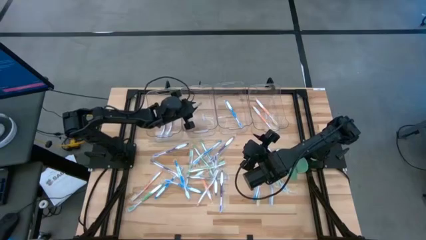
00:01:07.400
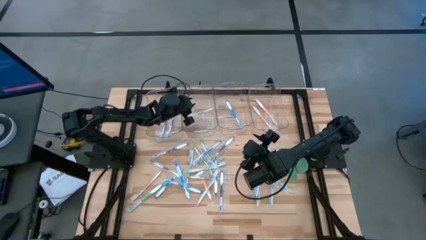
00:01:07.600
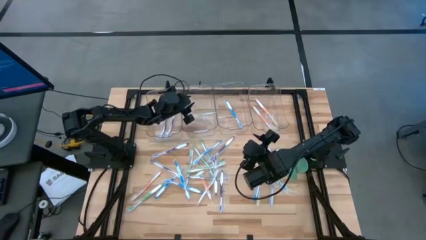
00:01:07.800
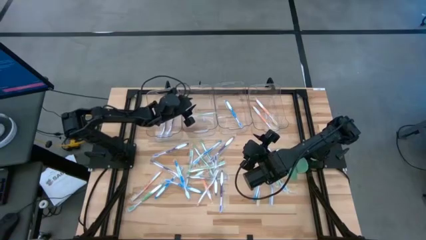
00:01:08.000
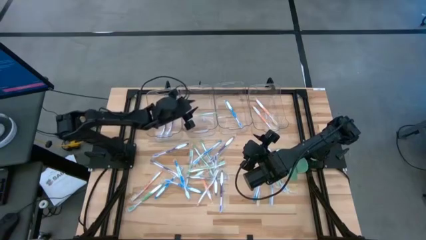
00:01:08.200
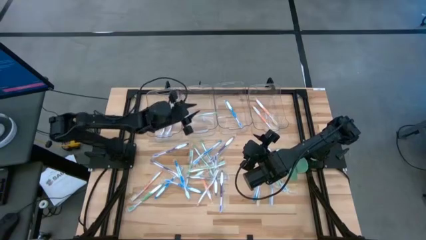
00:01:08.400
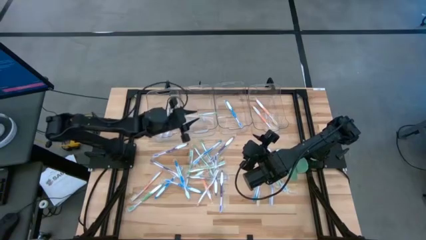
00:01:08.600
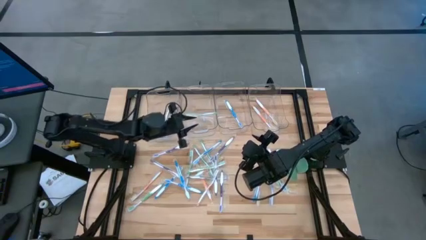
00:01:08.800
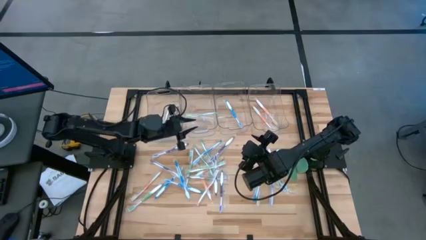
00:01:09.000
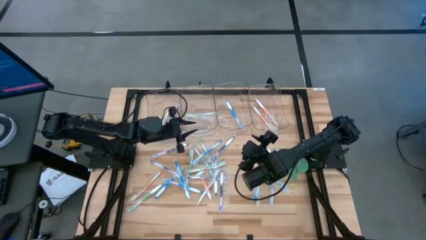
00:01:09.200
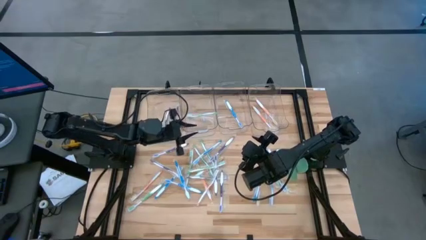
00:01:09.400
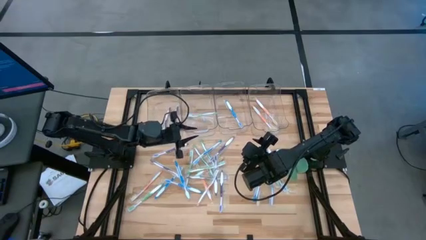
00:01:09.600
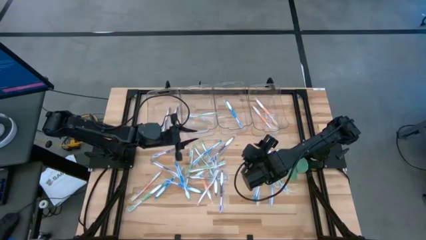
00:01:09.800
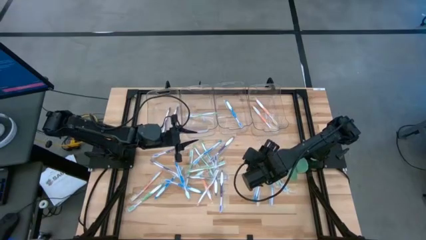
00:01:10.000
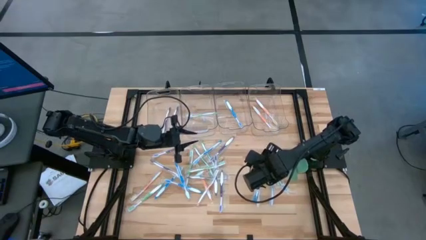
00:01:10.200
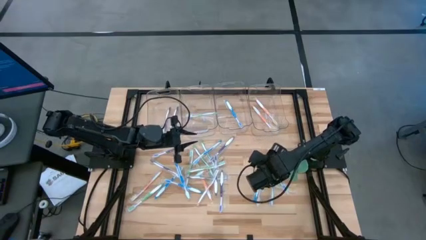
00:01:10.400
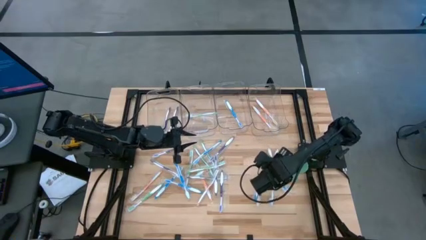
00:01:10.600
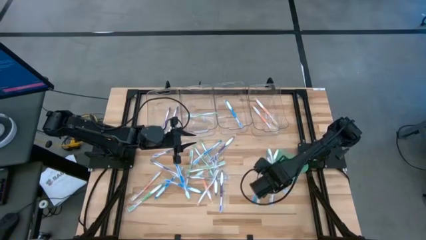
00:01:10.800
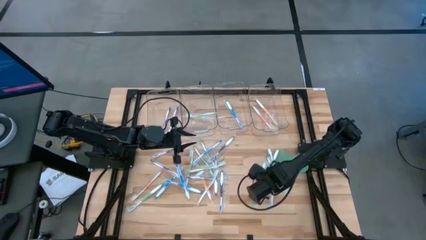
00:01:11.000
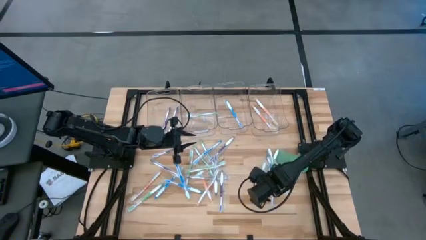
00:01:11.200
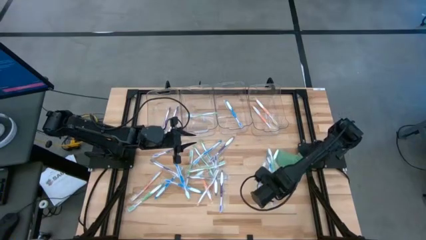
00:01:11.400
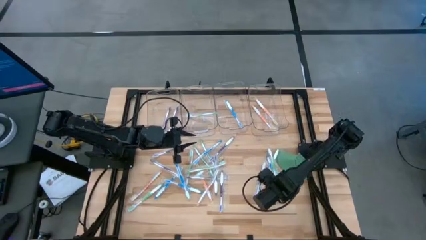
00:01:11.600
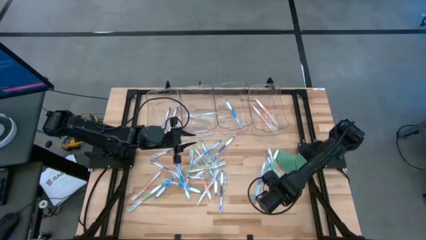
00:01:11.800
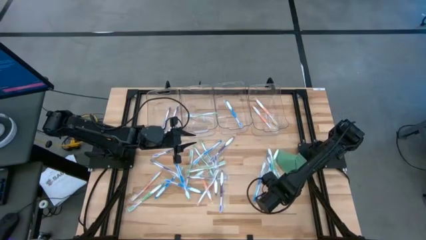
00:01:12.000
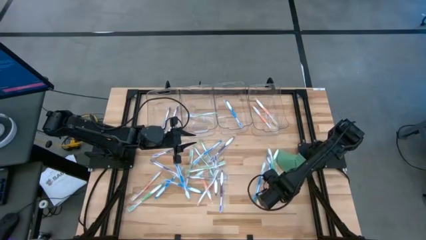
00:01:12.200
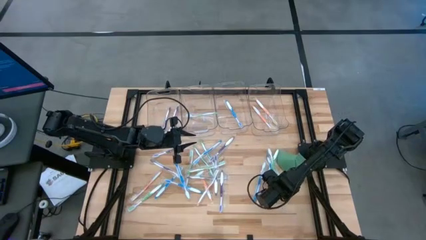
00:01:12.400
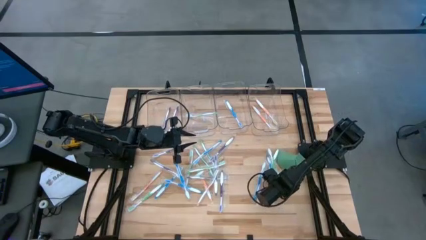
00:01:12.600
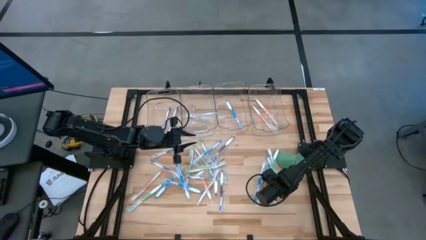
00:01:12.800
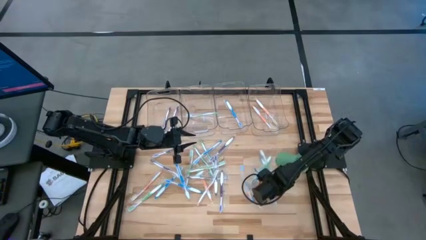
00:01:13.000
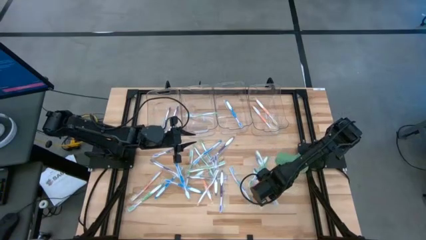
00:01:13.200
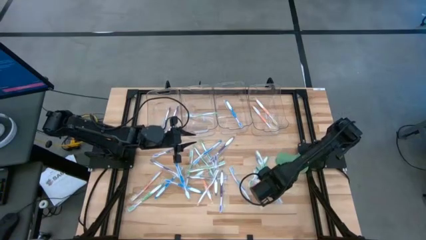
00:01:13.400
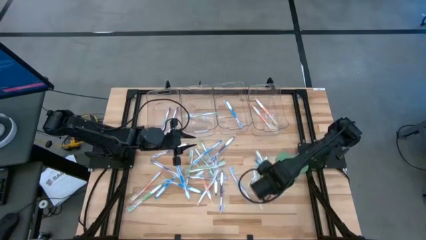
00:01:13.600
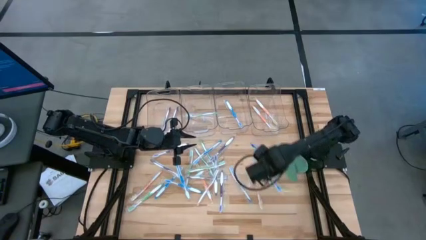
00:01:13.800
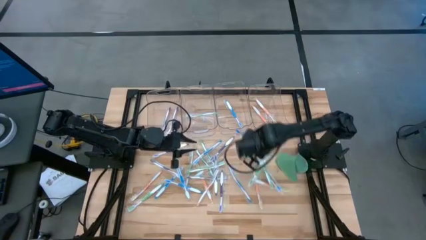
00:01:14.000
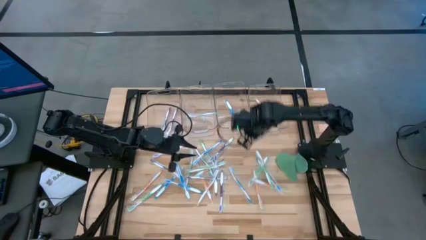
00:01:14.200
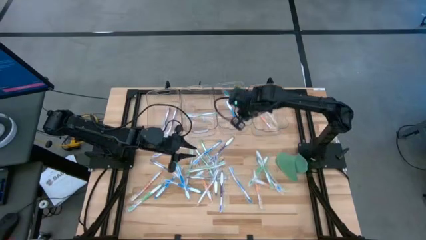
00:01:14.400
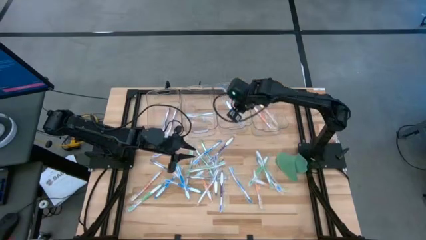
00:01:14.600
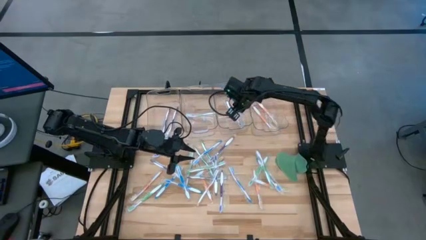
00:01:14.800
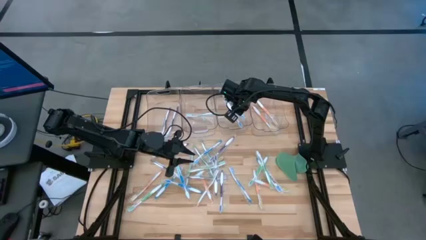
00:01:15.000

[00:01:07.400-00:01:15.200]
Task: Pick & Place Toothbrushes
Put the blue toothbrush into the middle right transparent bin

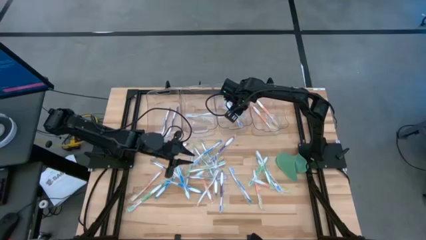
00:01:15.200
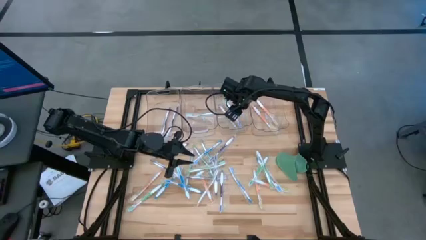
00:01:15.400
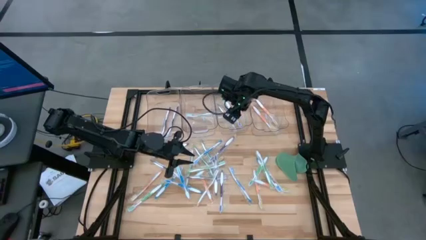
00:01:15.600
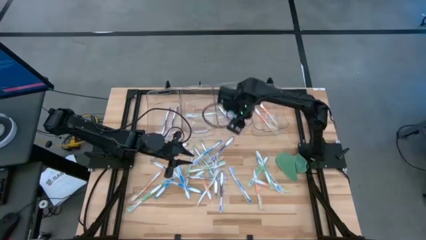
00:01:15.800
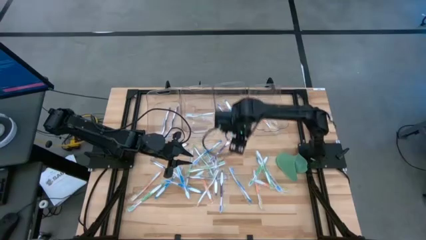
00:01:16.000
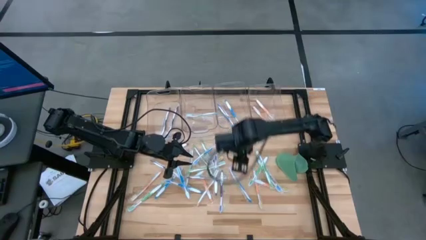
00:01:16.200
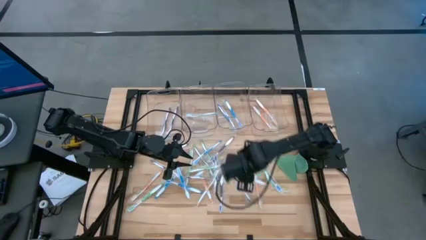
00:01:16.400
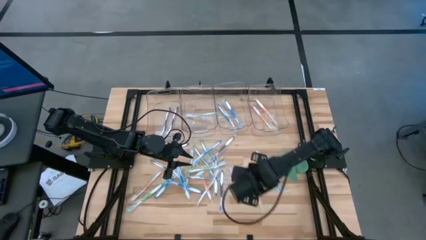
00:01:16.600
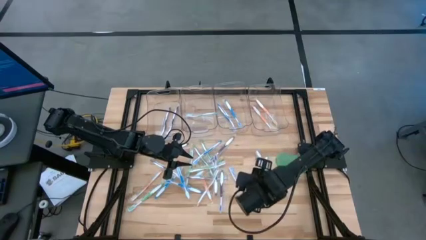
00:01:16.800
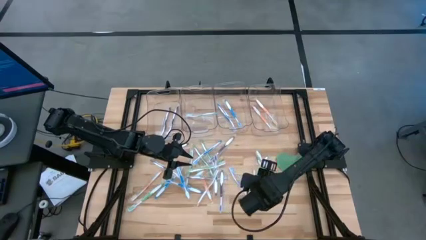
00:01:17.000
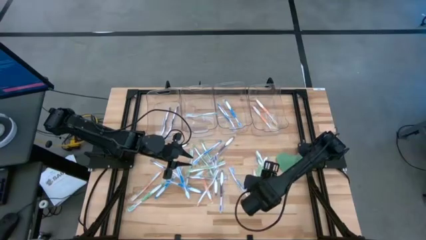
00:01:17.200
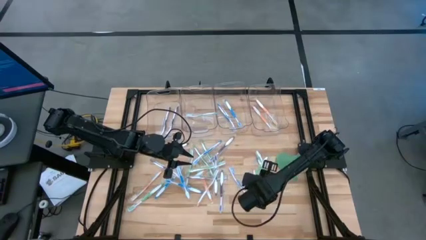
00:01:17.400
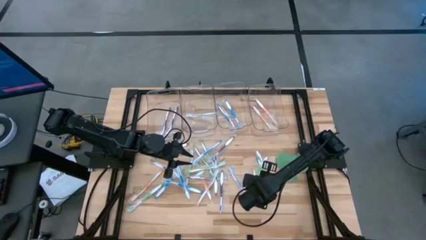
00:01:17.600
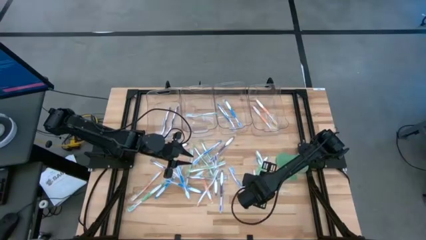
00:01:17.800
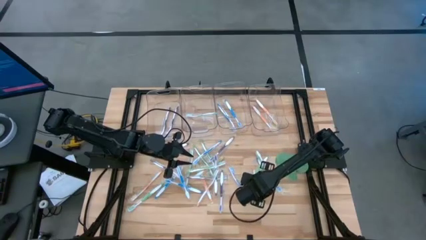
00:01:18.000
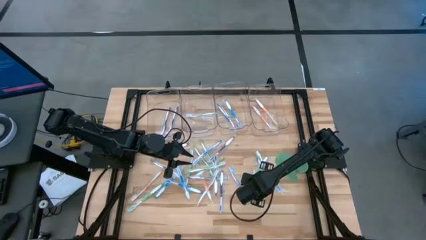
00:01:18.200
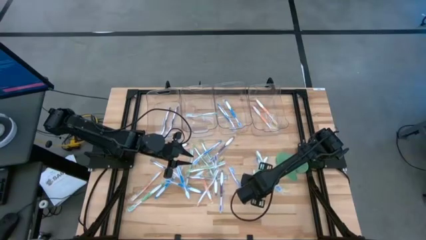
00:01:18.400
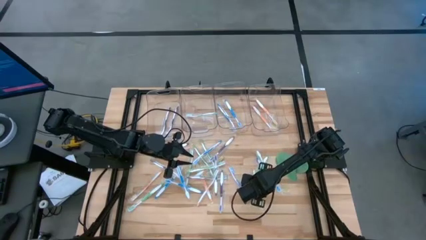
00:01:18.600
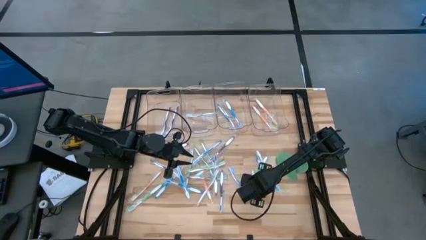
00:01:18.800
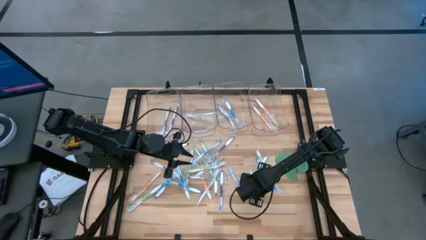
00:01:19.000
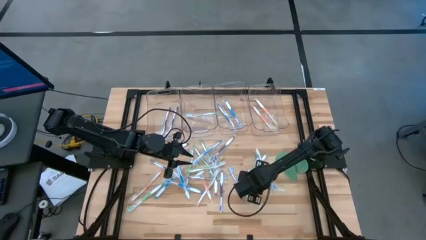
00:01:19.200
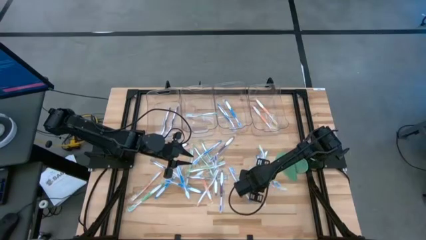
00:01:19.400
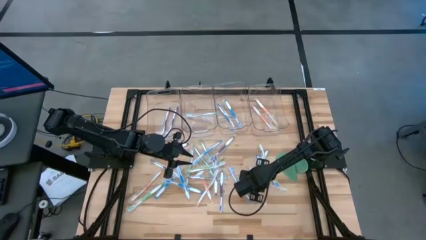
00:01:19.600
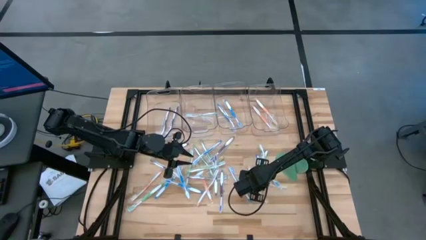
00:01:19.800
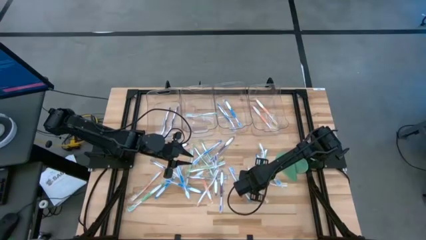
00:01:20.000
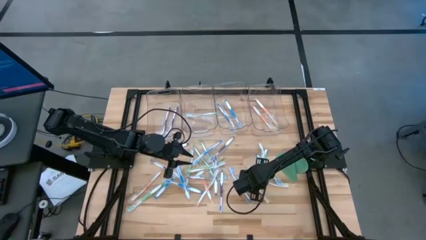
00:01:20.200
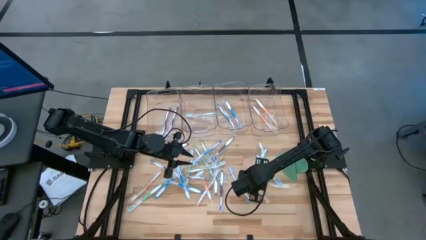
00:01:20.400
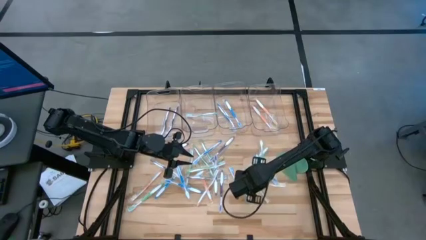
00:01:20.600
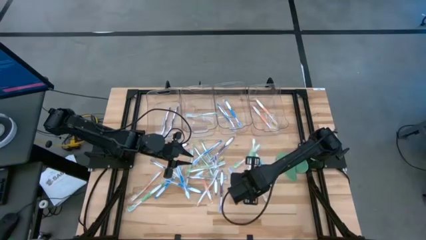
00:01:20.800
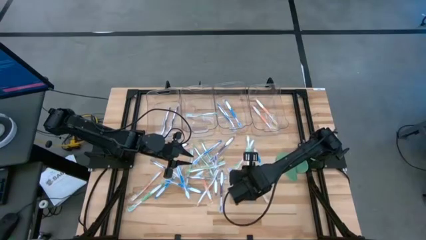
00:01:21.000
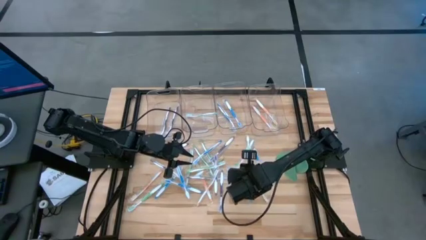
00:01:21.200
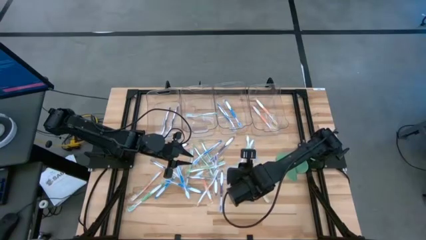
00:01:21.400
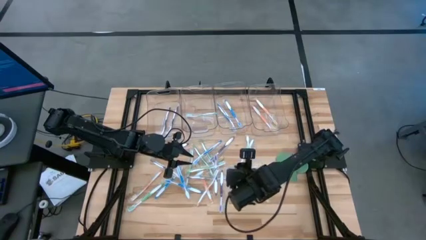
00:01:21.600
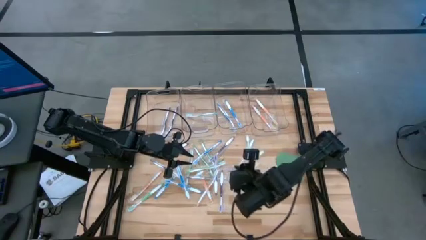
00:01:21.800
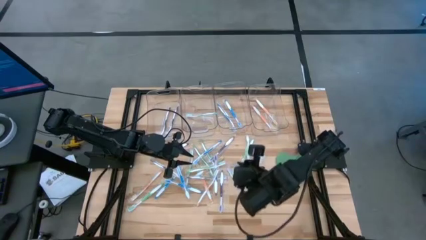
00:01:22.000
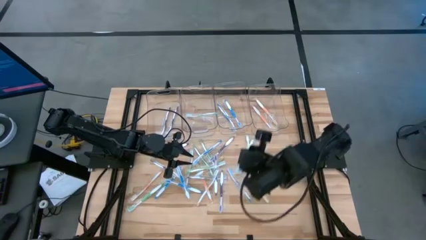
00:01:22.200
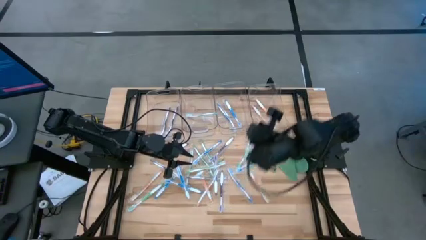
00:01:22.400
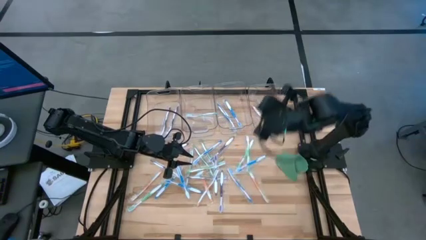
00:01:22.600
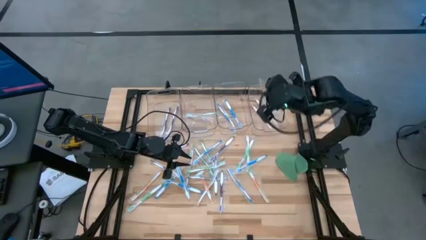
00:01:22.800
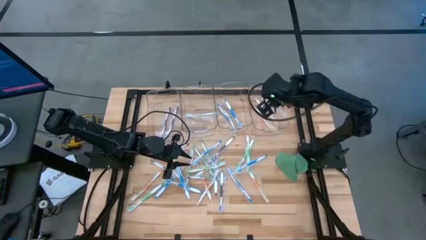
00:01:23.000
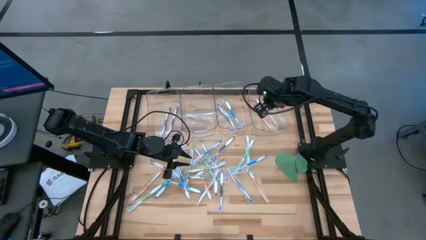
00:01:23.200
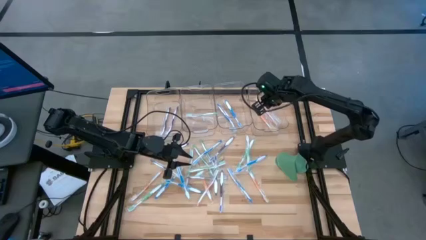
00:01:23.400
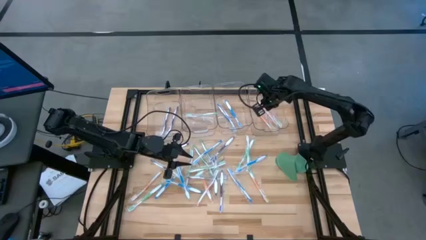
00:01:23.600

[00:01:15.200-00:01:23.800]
Put the orange toothbrush into the right transparent bin

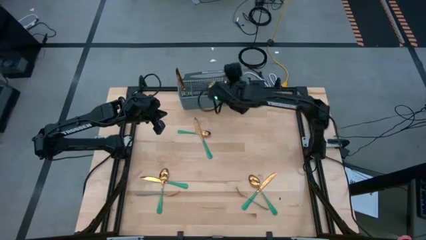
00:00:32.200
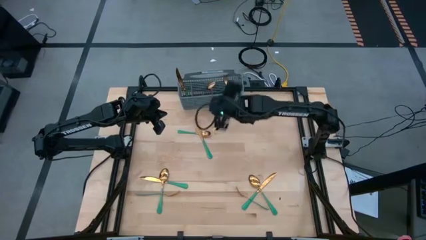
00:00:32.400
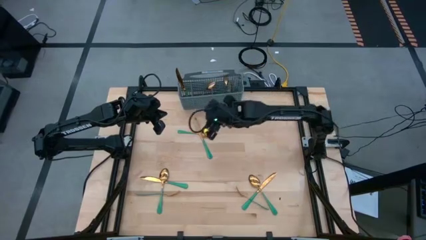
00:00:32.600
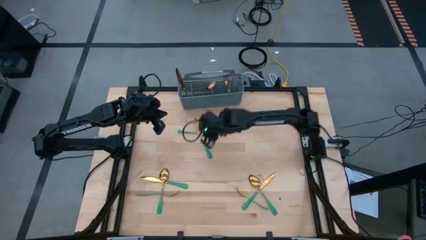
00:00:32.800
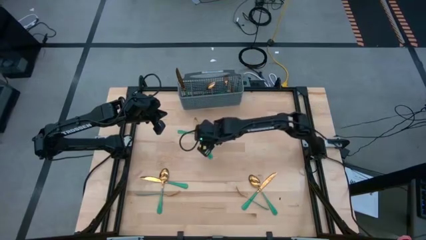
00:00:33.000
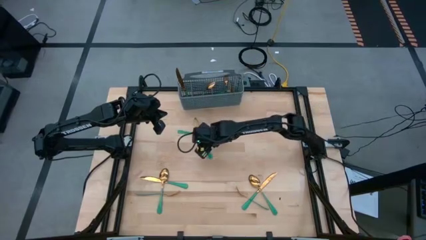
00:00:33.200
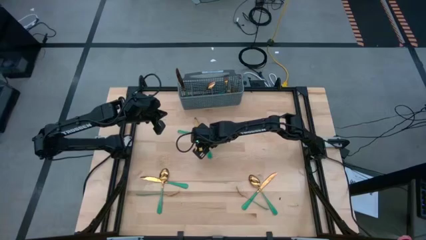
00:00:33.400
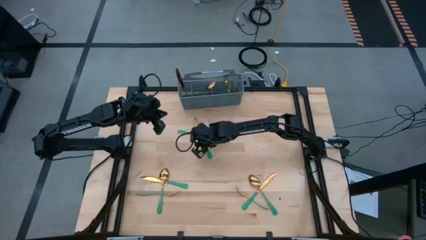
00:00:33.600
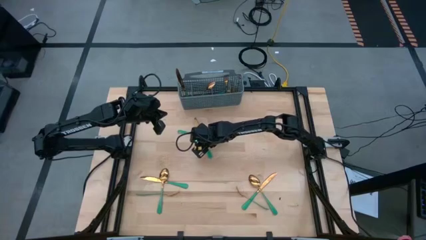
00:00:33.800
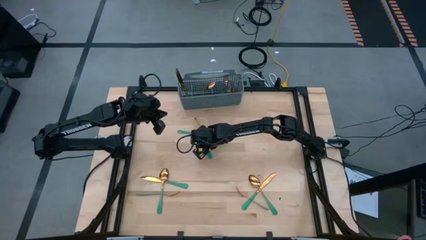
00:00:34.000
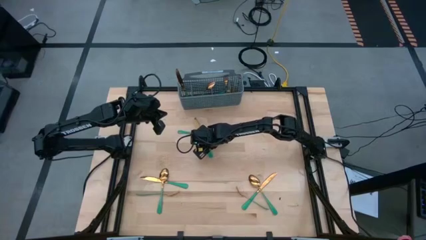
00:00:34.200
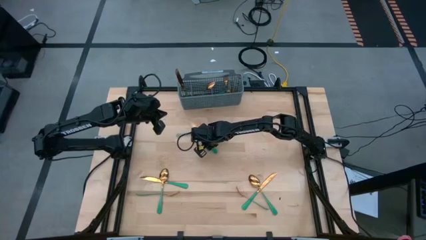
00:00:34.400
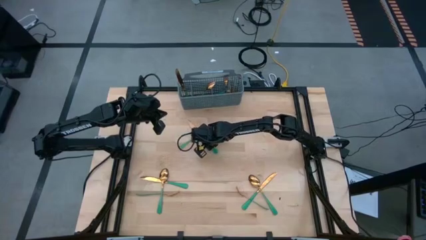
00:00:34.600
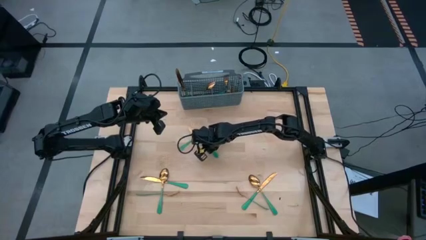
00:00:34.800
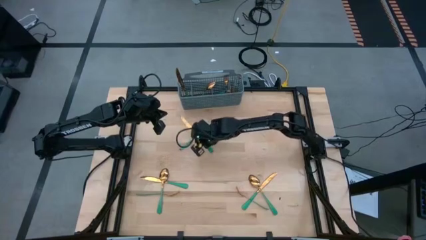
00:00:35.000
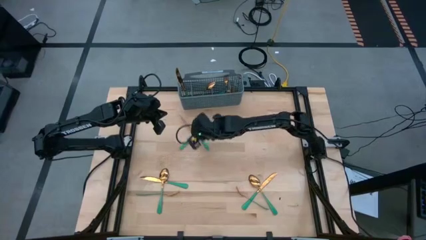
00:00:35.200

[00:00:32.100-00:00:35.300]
Task: Sort silverware
Put the green knife into the gray bin
